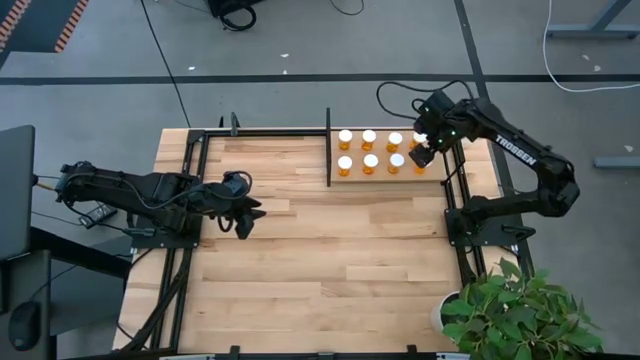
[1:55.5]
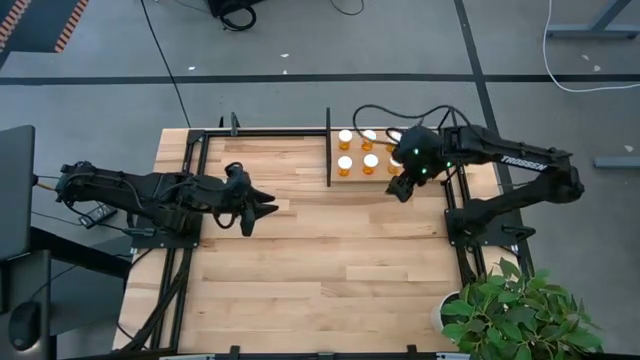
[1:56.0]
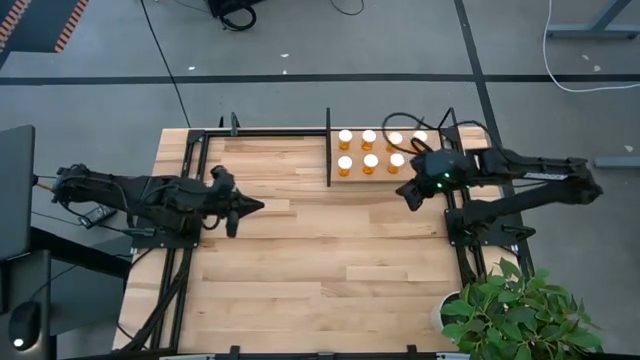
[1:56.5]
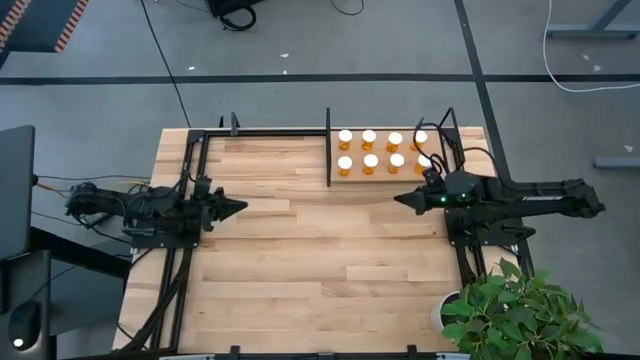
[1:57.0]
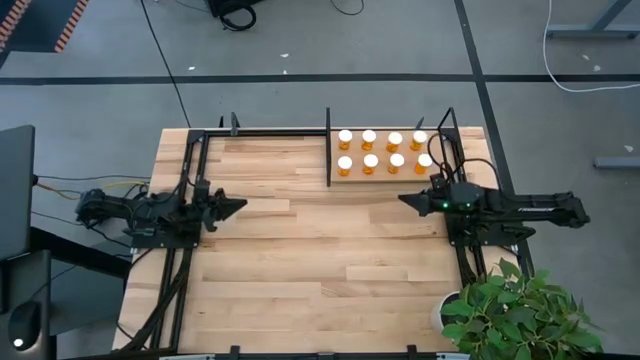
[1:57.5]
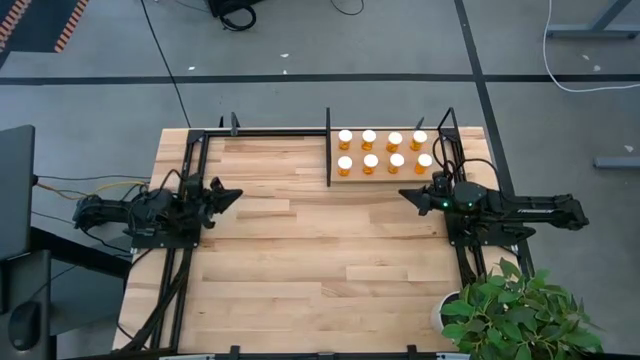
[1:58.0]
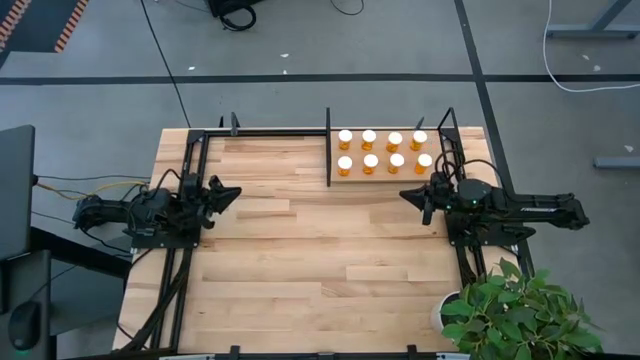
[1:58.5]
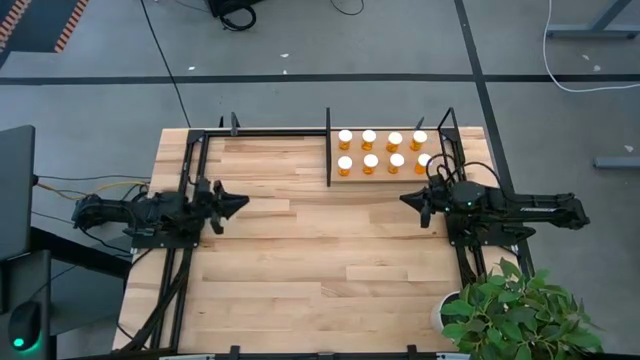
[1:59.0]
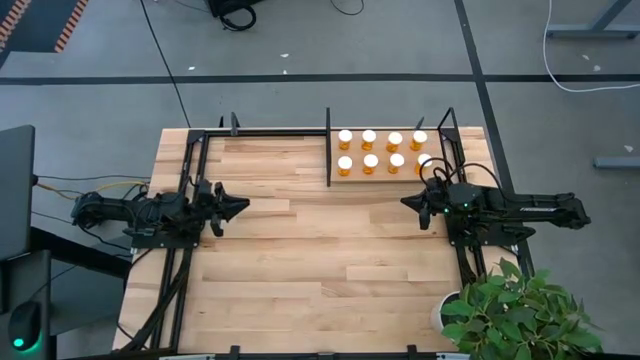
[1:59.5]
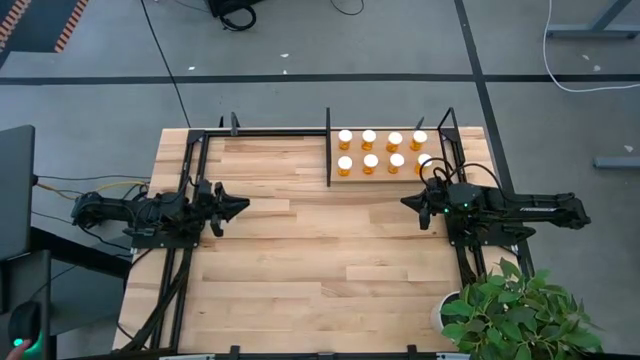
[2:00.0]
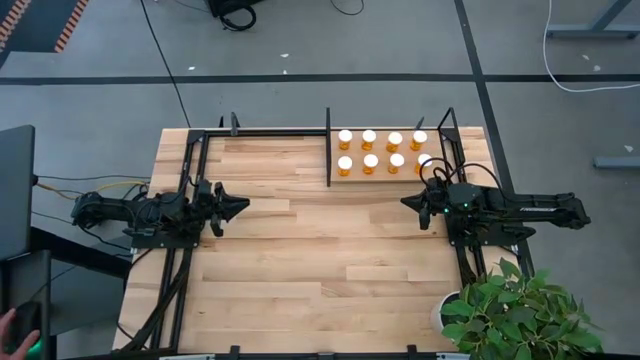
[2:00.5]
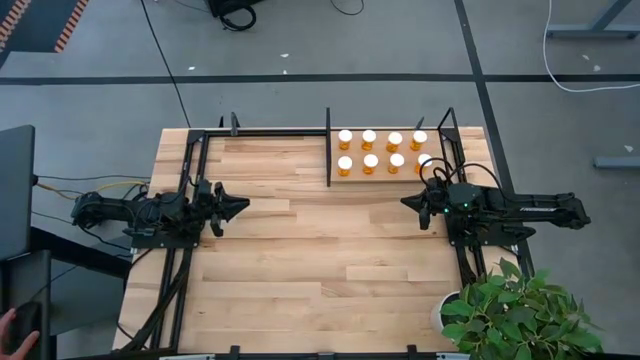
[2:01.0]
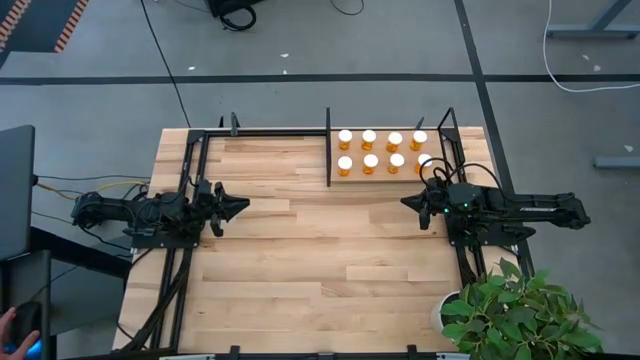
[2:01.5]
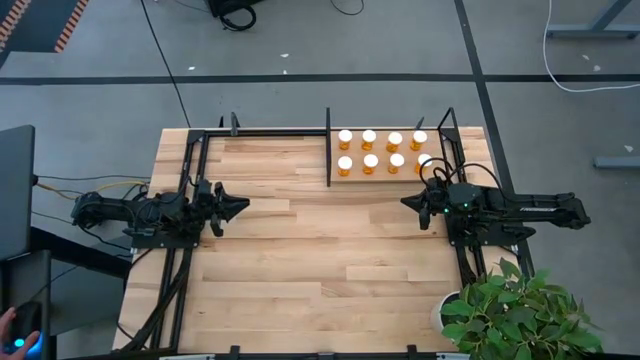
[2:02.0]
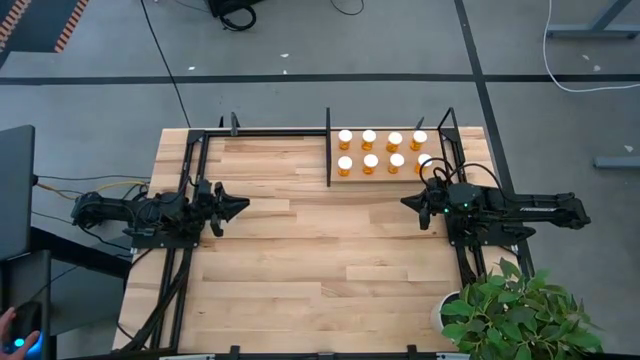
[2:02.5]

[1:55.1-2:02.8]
Task: Pick and place medicine bottles onto shelf by color
Return to Home Position

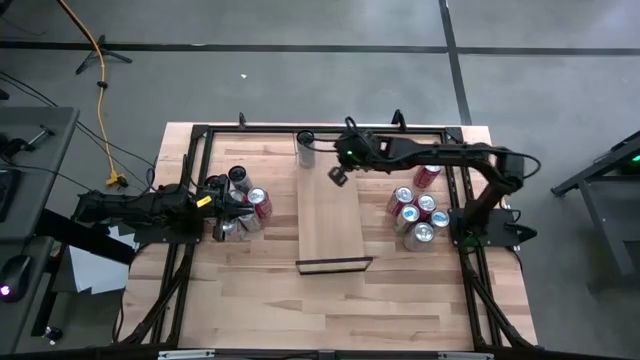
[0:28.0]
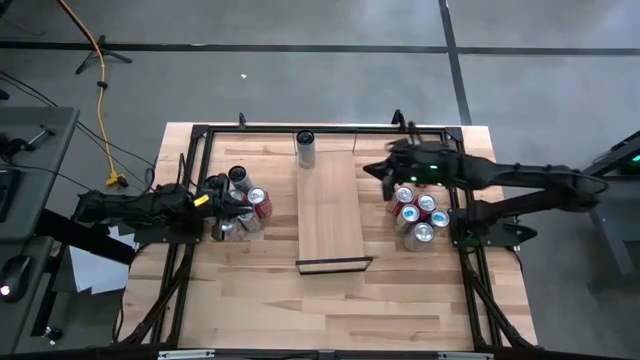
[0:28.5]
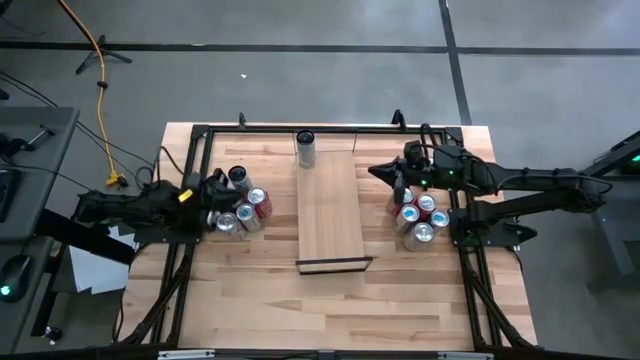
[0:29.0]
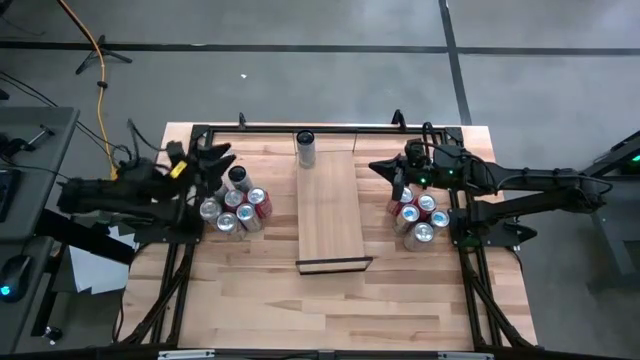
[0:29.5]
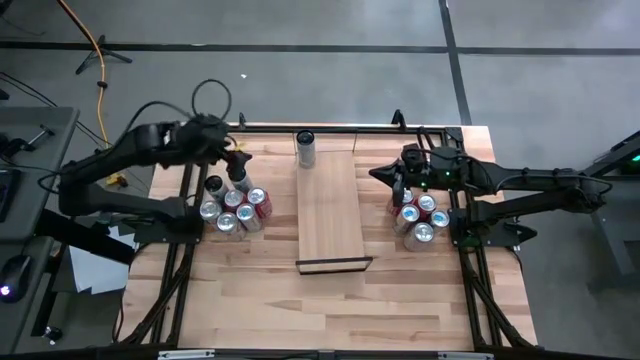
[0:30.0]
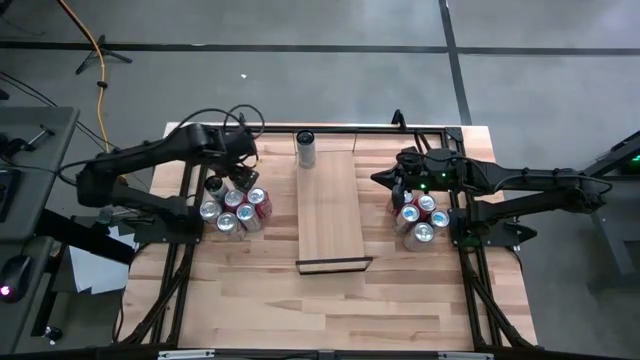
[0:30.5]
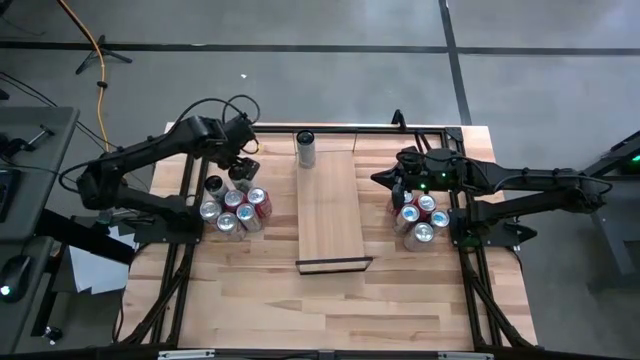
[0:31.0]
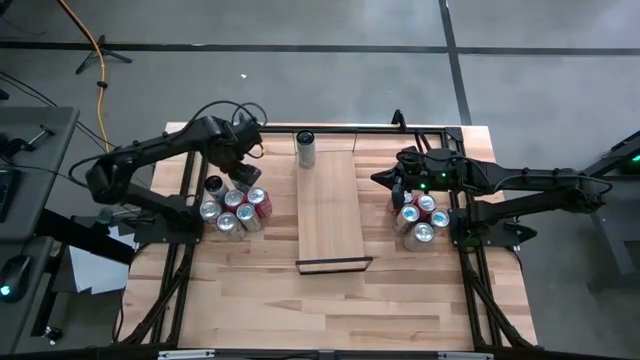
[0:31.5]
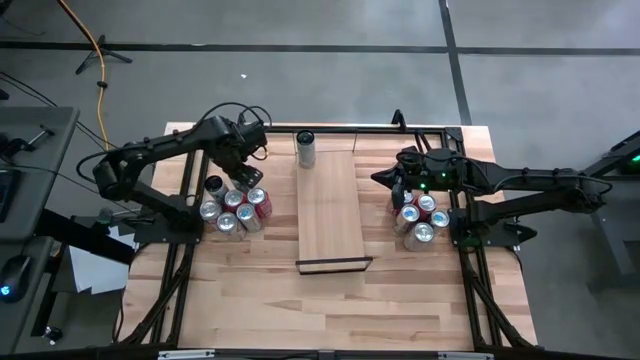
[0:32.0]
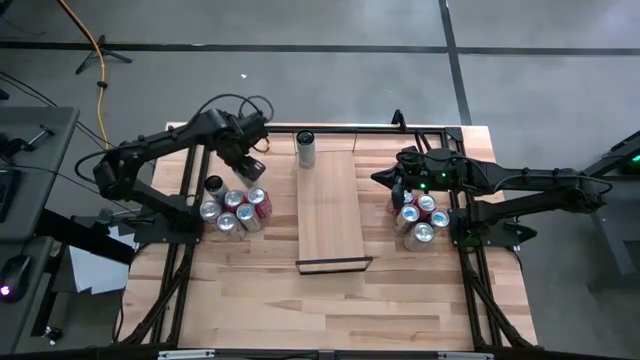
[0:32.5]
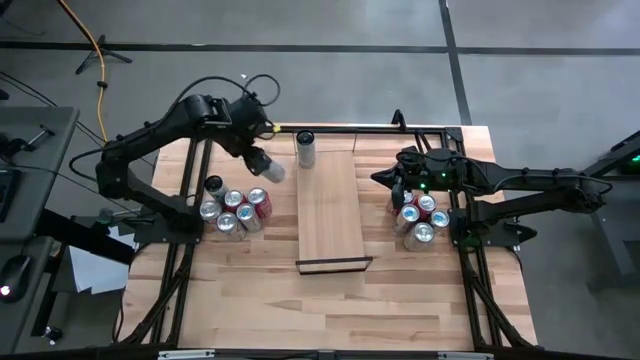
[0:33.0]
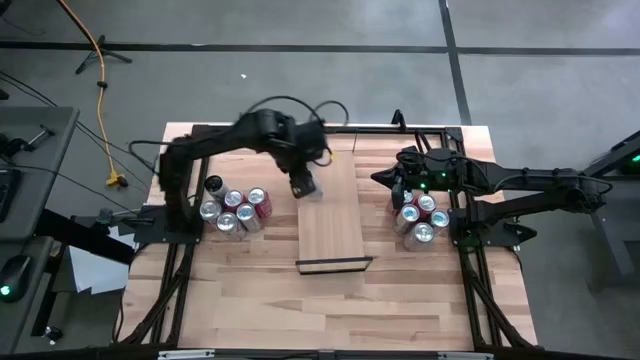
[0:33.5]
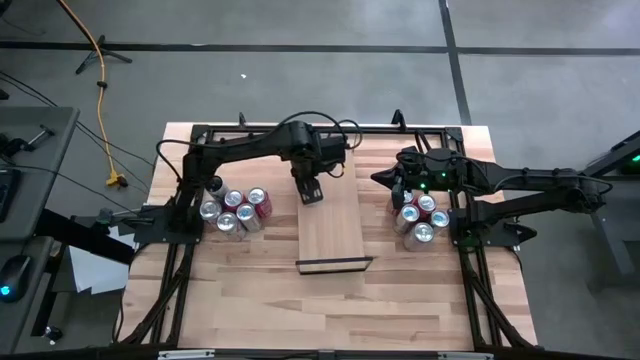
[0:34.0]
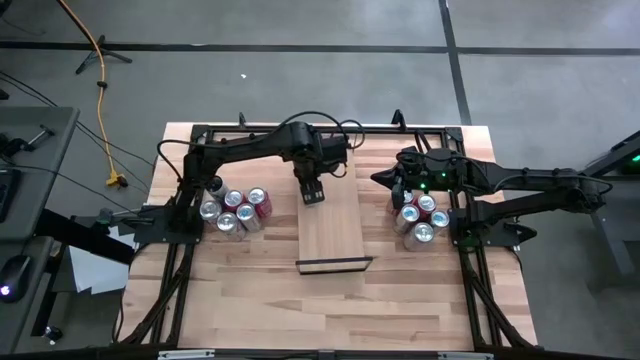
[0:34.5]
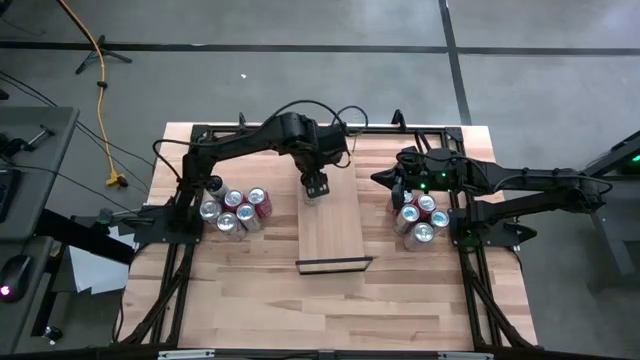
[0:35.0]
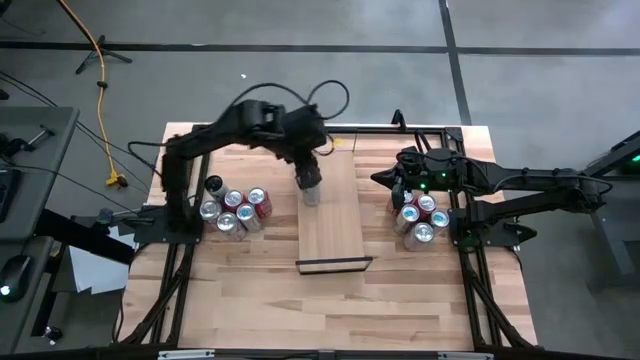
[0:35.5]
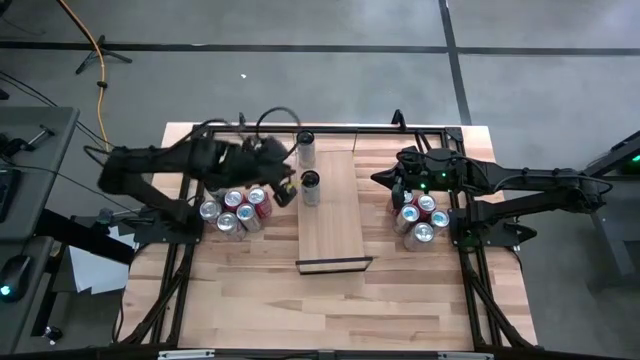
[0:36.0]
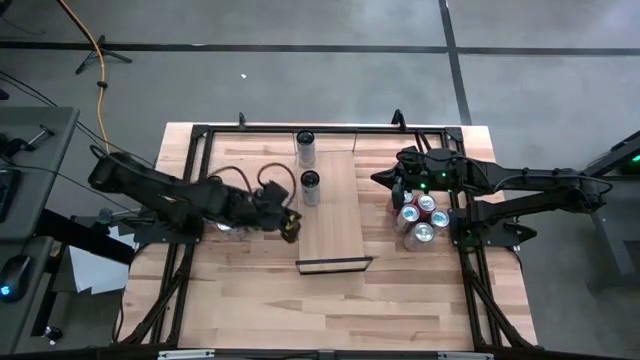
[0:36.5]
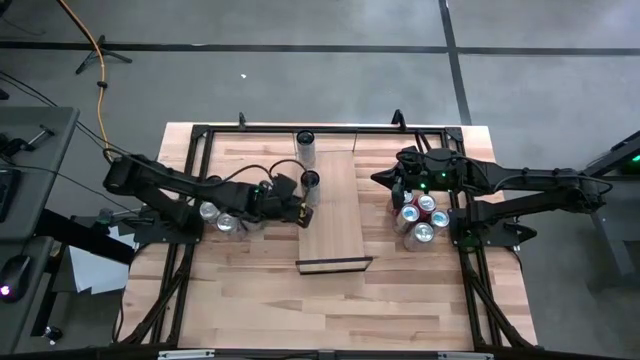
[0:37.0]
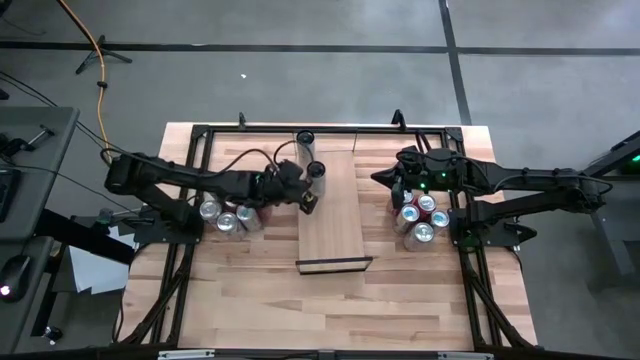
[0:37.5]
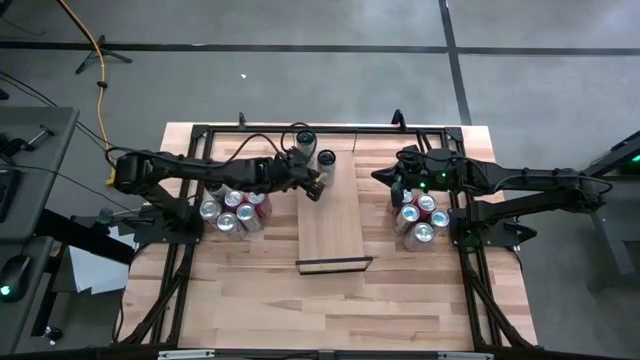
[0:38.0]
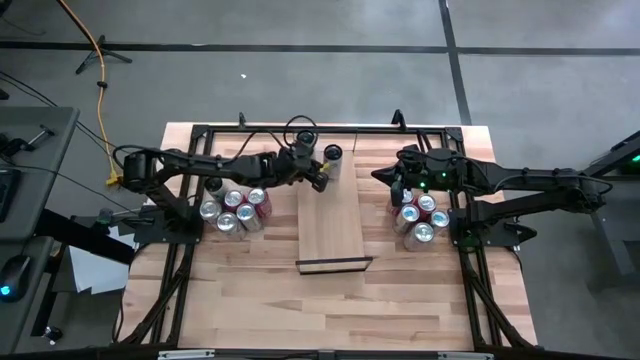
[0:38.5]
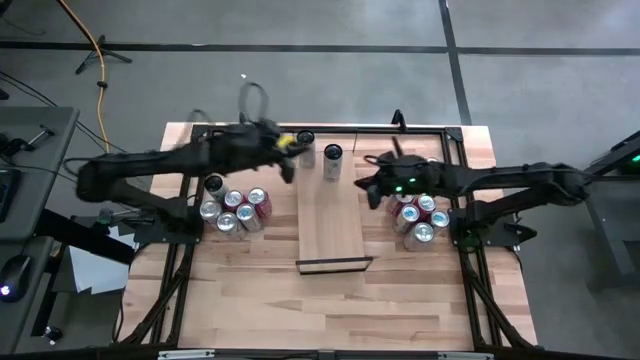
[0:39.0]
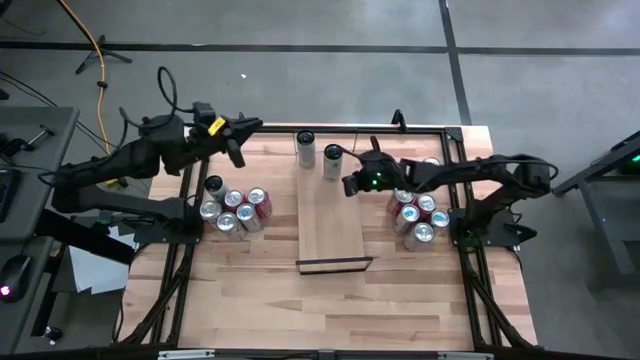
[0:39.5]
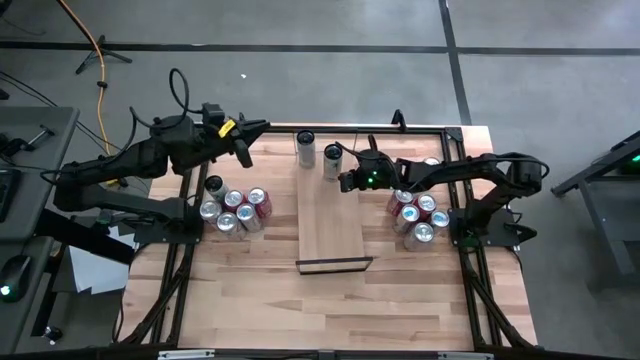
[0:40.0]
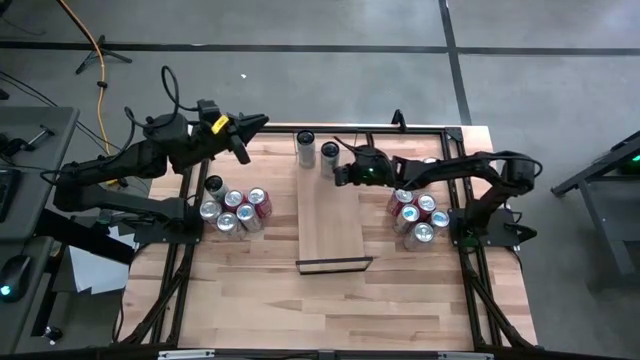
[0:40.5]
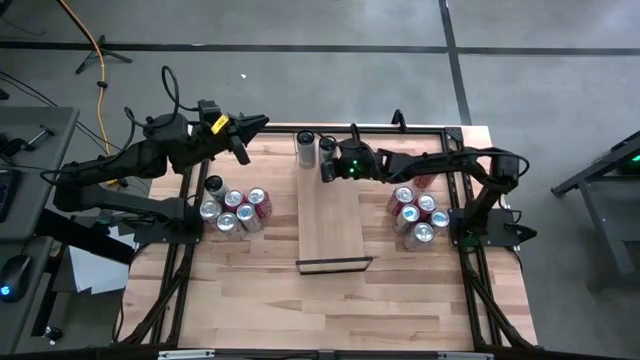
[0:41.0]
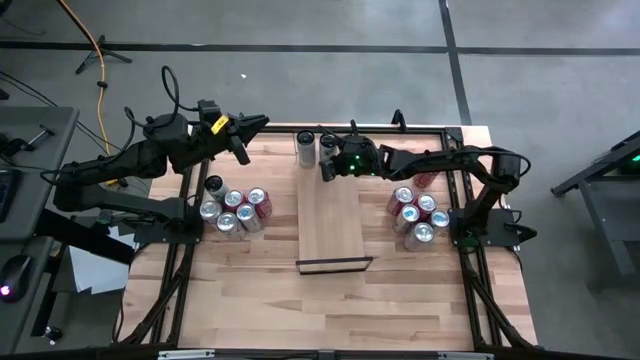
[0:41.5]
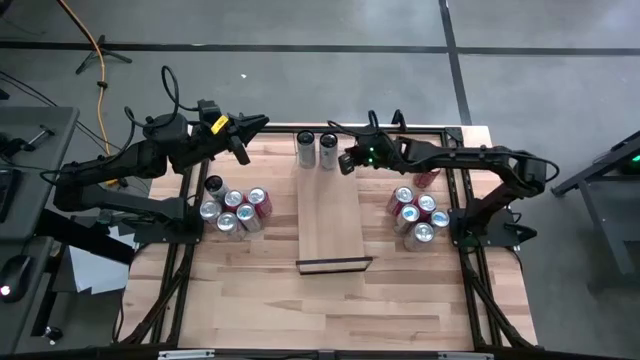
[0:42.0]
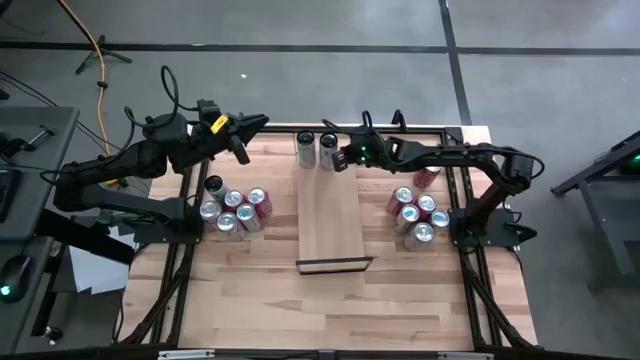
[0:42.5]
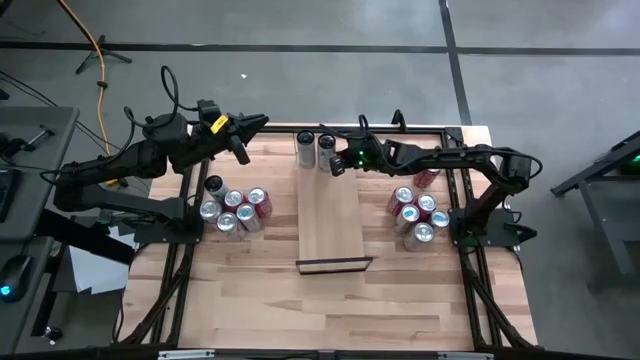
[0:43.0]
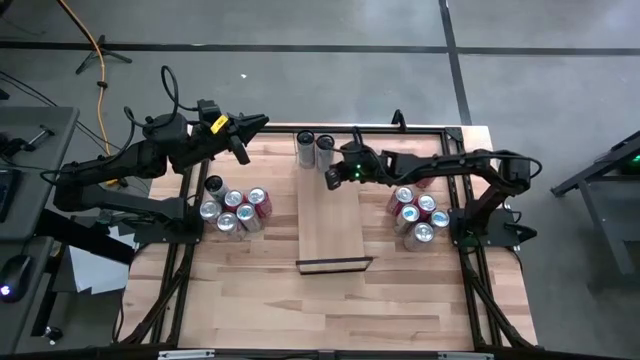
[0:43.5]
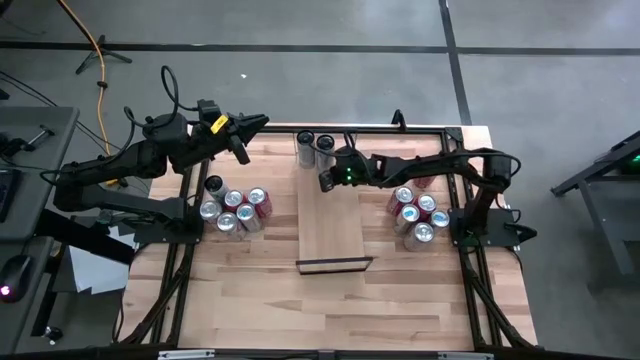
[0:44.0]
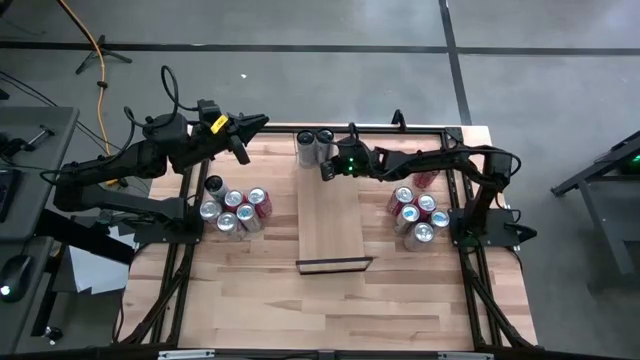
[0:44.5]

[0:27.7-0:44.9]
Task: Place canned beverage on shelf
Put the right white/pink soda can on the shelf aligned with the other white/pink soda cans
